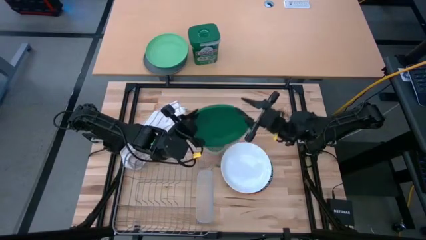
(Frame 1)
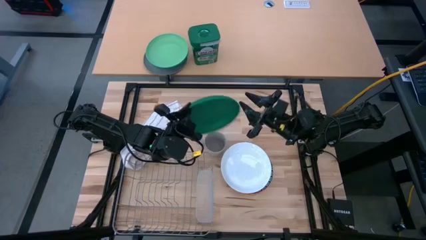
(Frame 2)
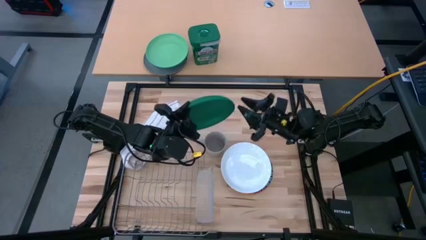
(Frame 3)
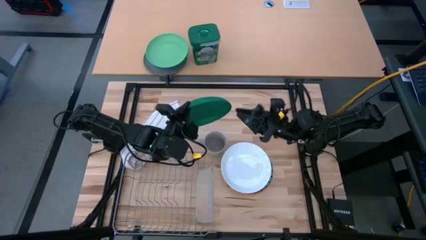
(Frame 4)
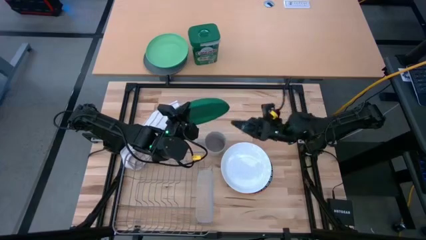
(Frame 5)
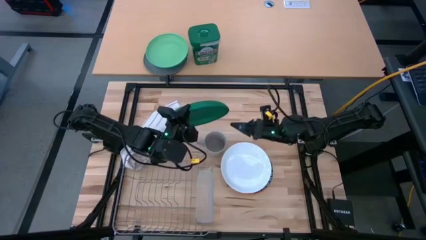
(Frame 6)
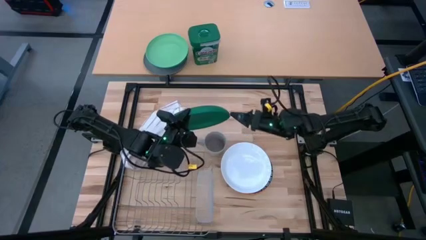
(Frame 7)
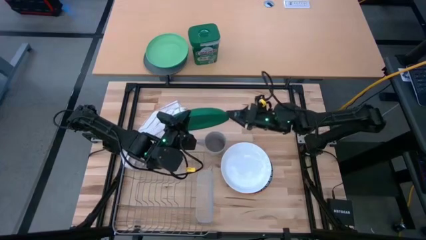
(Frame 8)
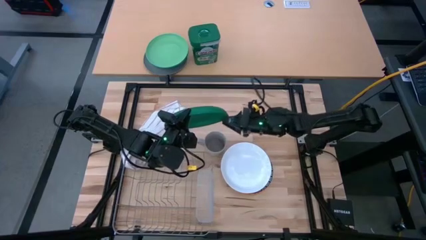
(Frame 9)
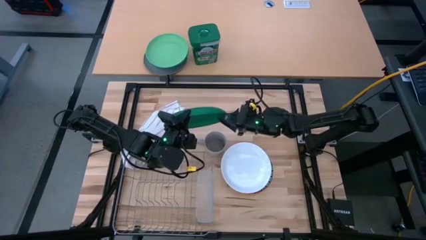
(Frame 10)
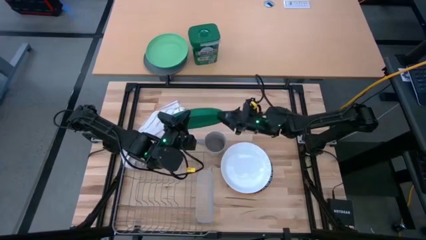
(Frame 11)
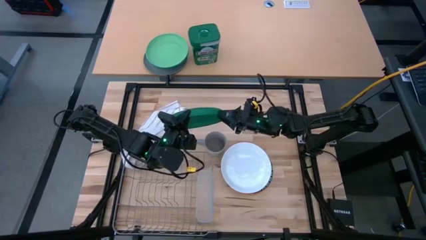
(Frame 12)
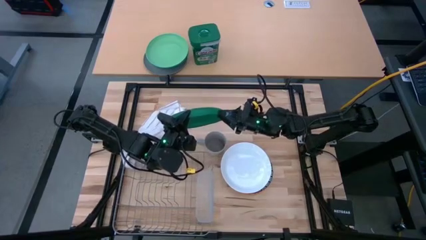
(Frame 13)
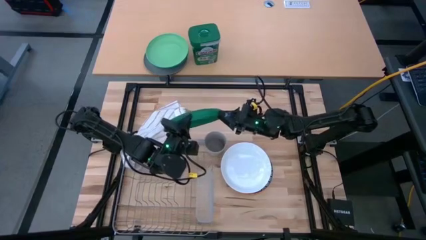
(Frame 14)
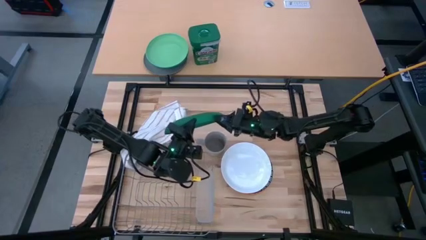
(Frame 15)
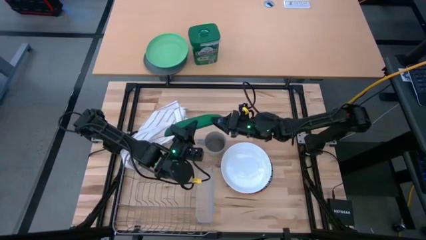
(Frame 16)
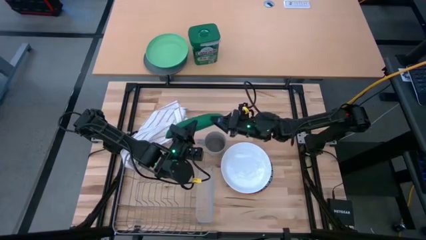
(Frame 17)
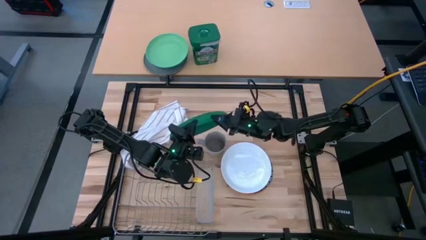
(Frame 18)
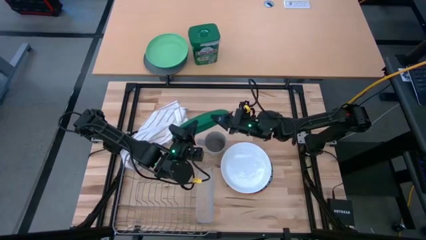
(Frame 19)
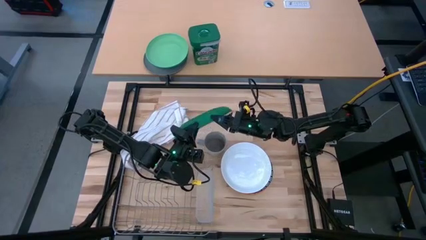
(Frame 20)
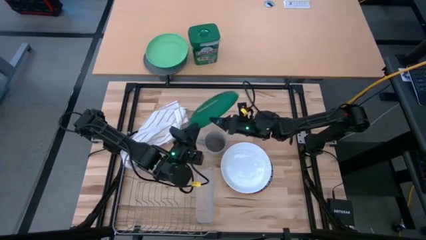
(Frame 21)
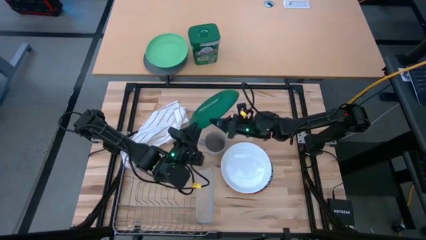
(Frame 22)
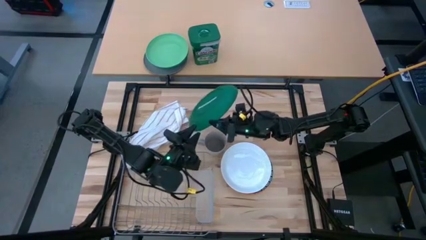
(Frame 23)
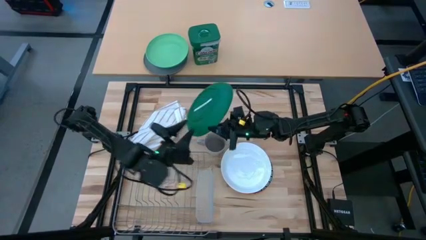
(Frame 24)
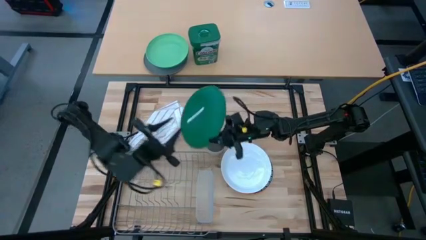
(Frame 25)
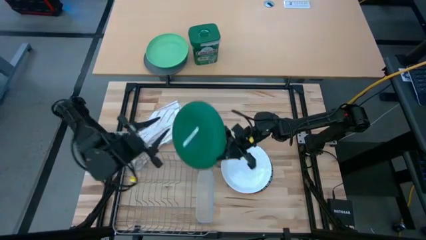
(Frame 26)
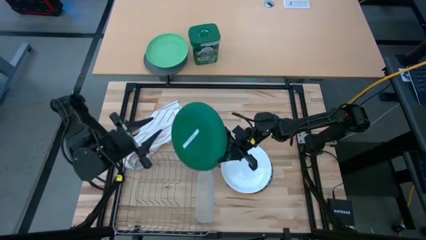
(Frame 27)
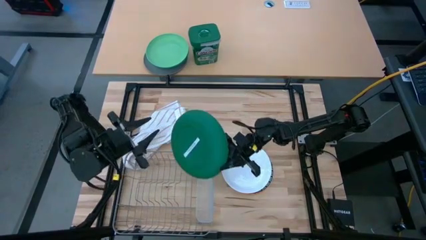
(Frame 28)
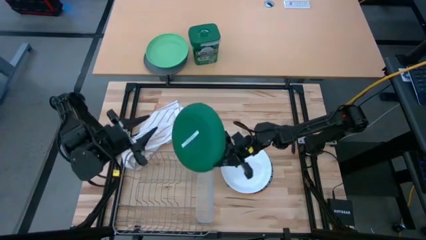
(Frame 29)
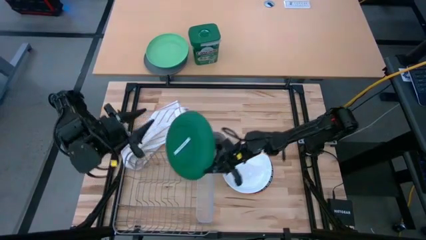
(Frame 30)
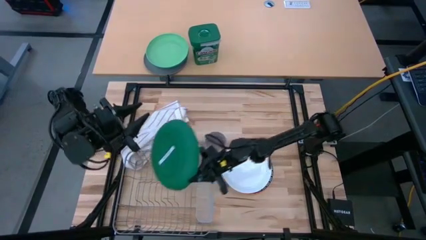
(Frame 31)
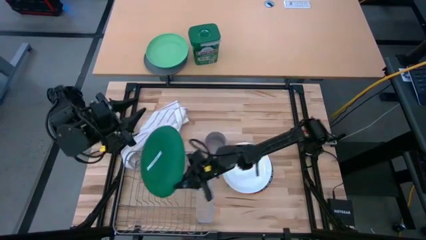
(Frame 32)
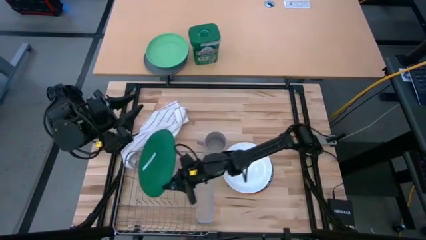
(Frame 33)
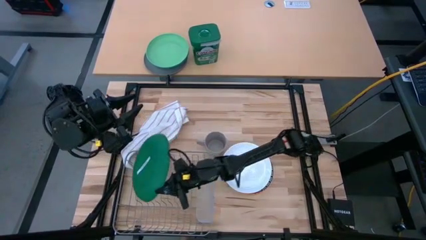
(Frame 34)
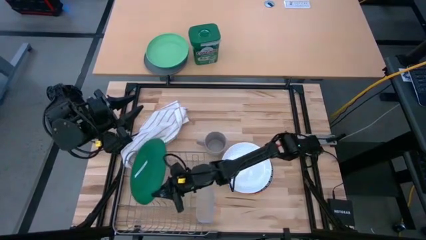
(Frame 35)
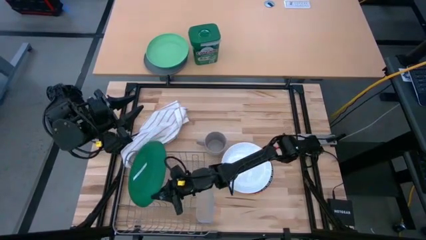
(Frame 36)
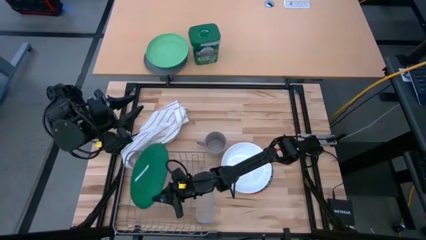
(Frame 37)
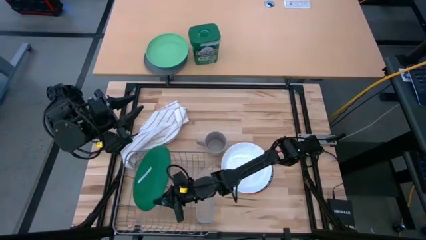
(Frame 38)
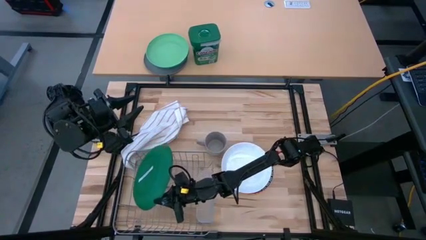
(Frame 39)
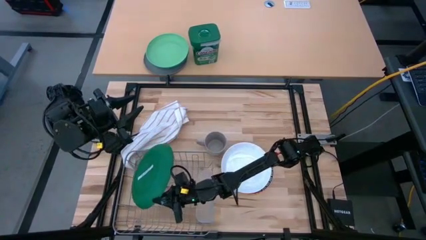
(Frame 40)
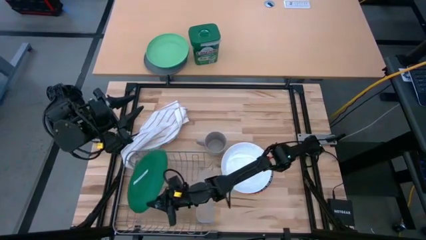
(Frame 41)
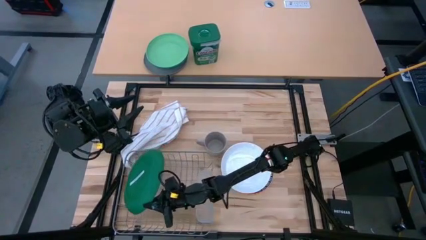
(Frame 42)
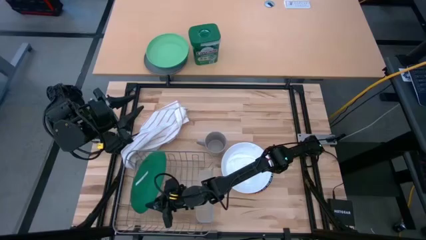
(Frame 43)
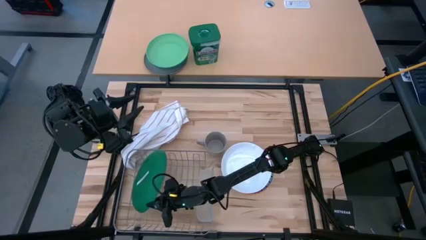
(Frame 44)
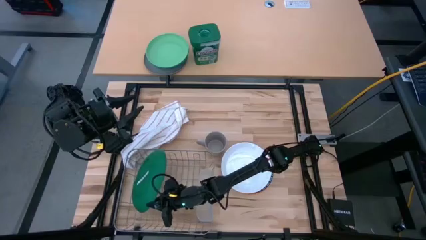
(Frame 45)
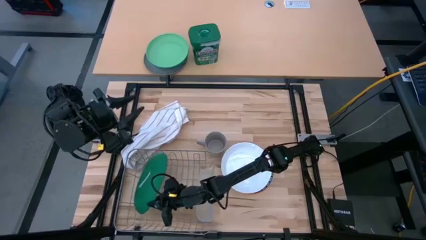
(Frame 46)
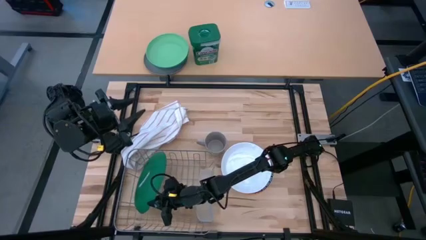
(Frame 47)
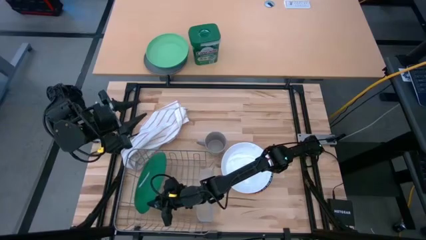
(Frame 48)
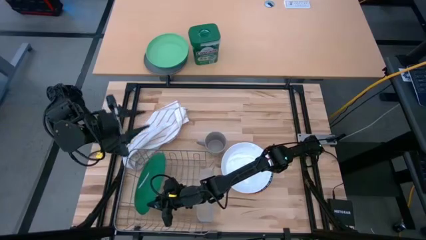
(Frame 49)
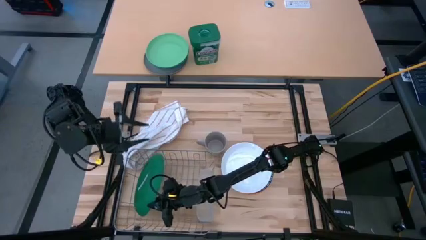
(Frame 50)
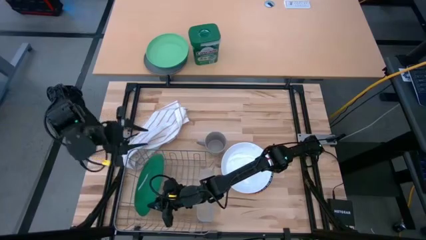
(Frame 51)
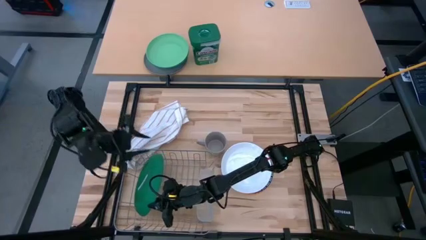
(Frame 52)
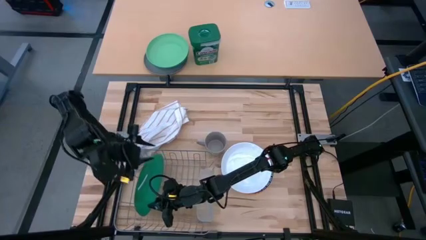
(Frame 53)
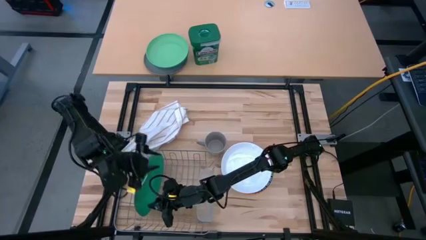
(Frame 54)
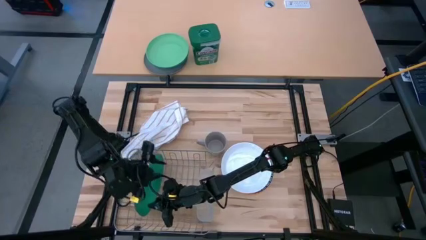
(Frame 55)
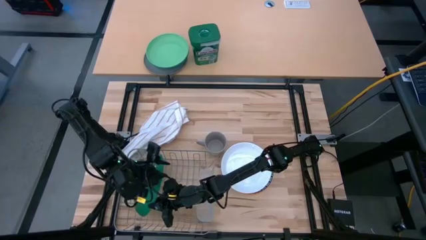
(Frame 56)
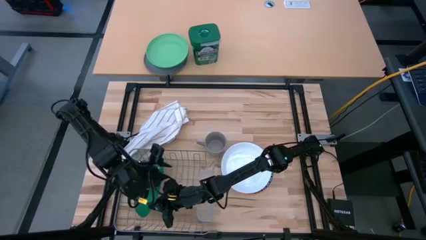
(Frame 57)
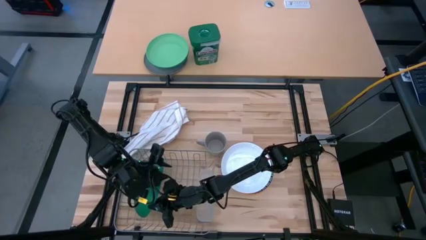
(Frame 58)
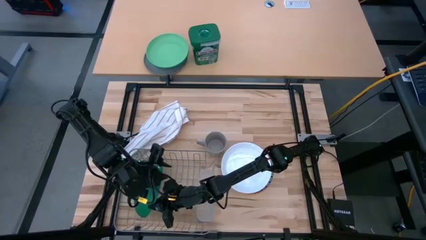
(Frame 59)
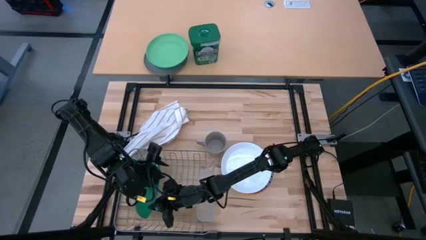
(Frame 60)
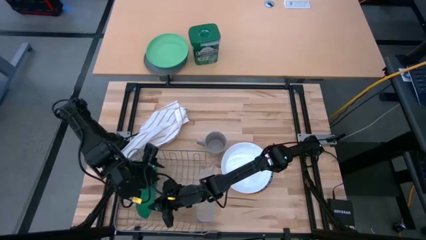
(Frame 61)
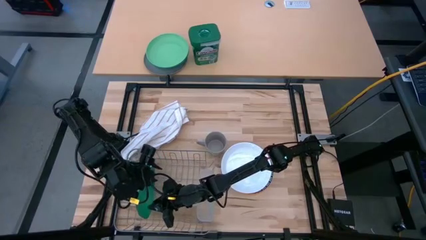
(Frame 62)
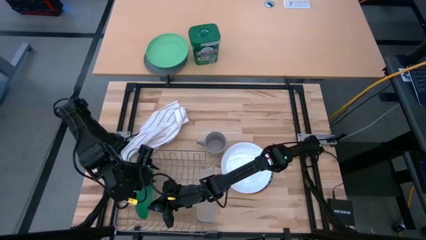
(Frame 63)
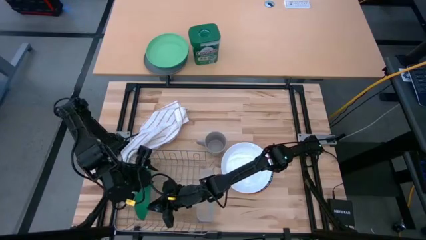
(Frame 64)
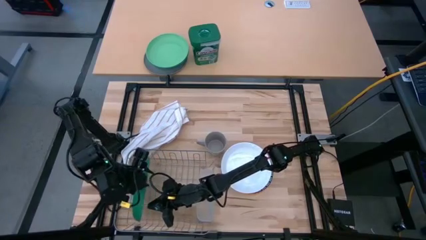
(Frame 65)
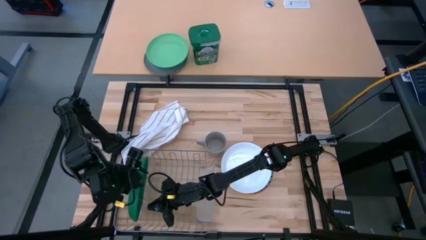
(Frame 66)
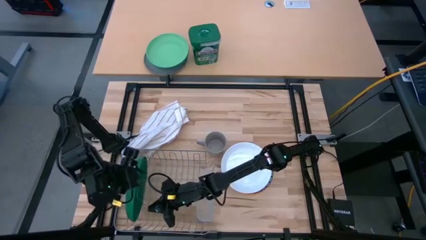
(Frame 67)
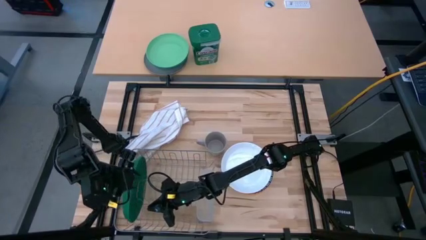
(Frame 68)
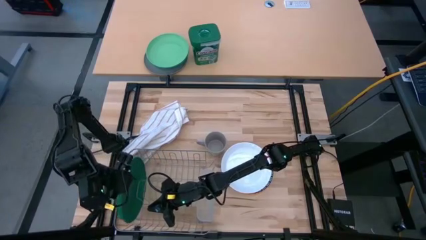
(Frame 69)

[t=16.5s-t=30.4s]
Task: Sort dishes
Put the green plate into the dish rack
